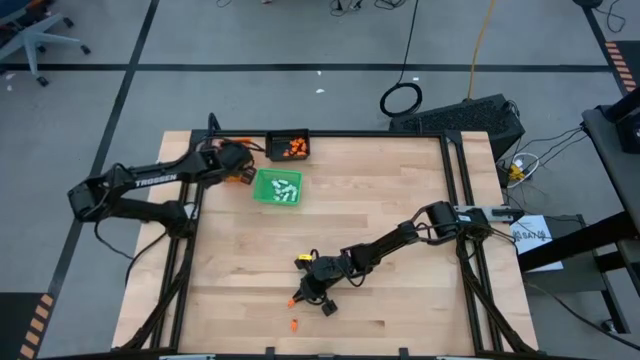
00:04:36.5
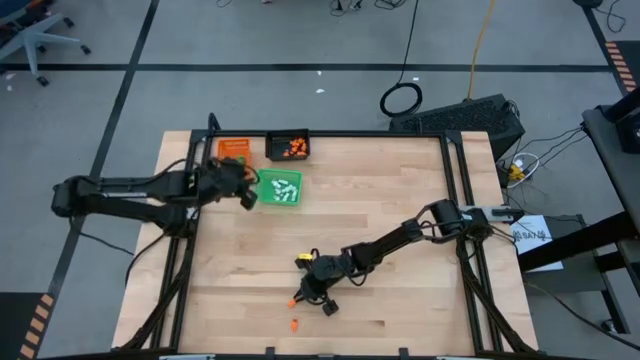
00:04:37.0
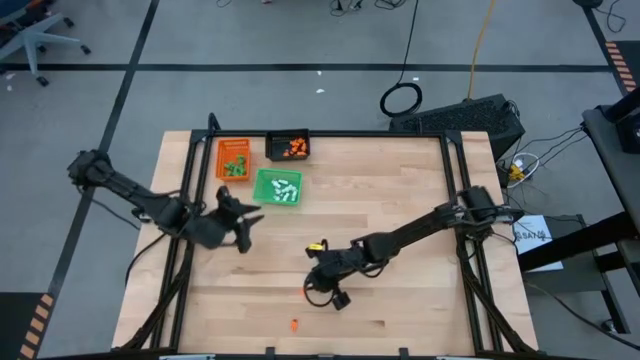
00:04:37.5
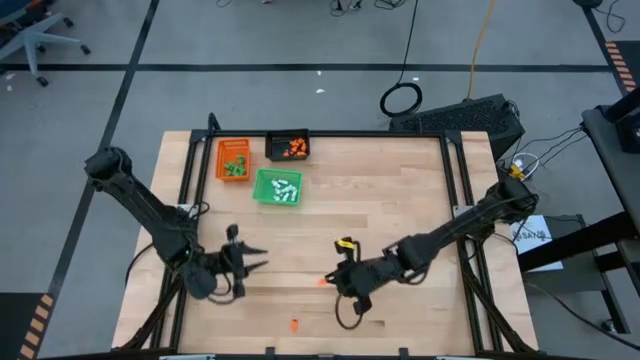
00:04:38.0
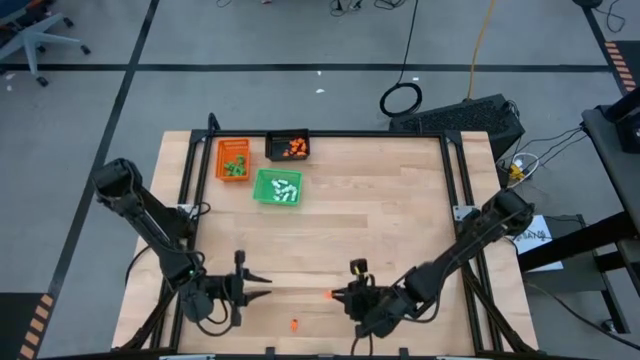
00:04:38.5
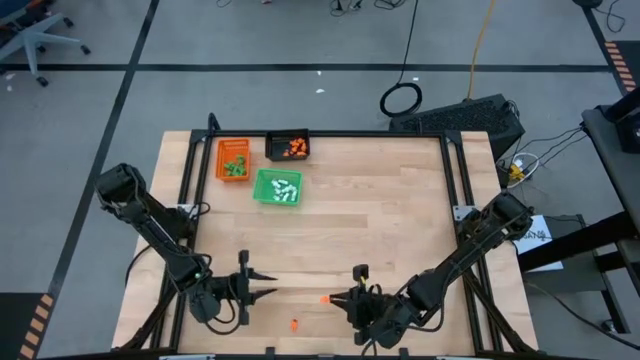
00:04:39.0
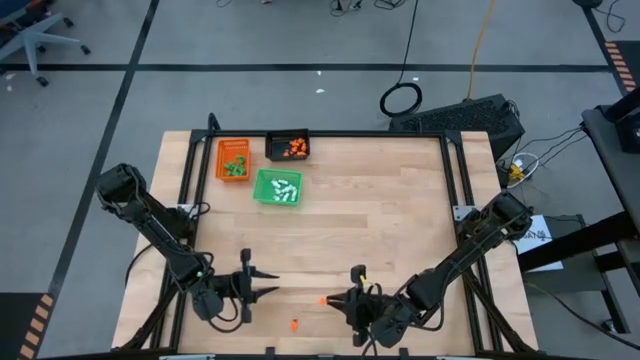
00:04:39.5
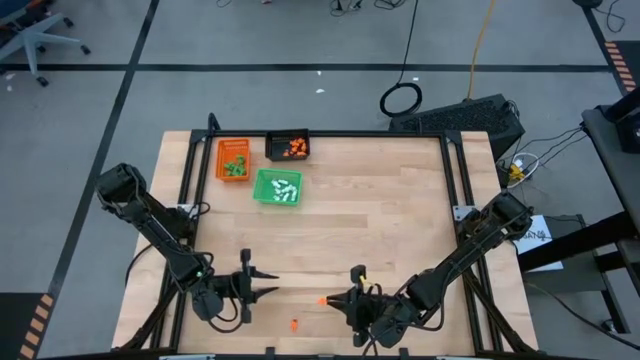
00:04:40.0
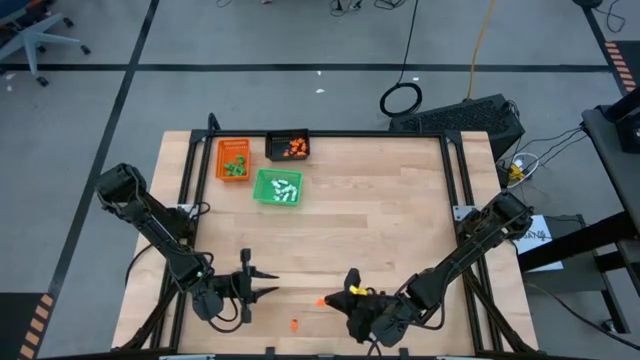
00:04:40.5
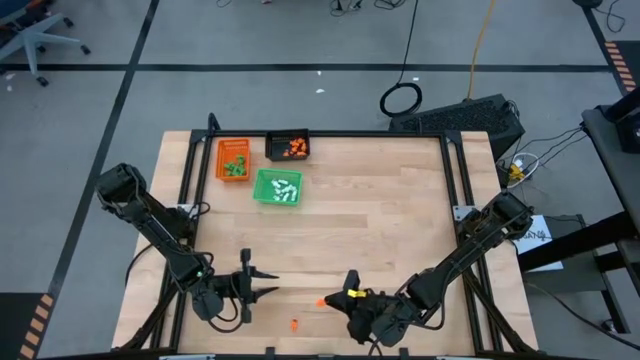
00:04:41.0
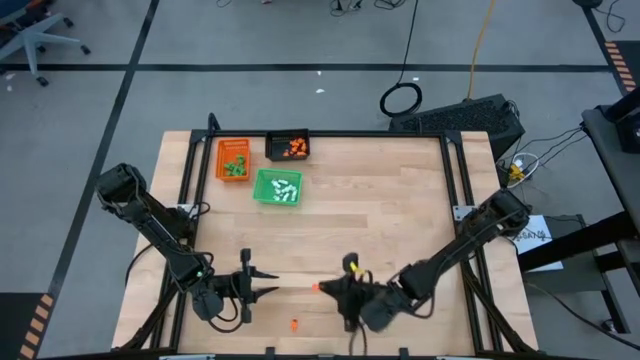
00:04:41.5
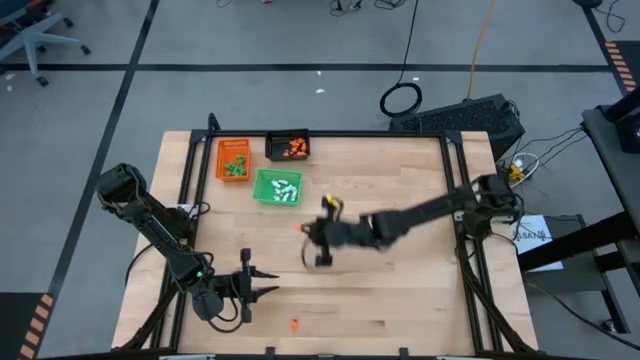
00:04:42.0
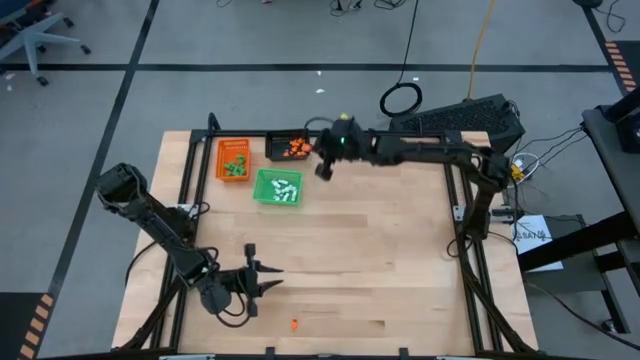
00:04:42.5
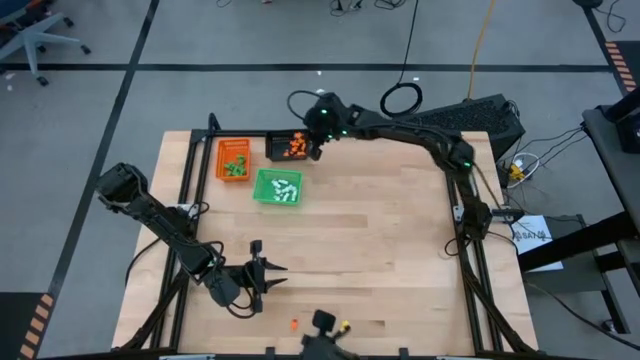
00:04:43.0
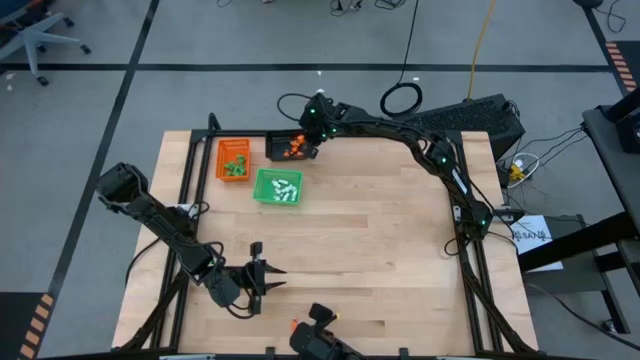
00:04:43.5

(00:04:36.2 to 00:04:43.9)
Task: Sort Halloween decoration
Put the orange skeleton toy into the black bin

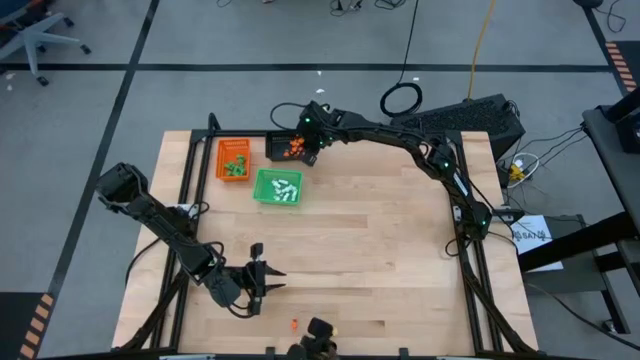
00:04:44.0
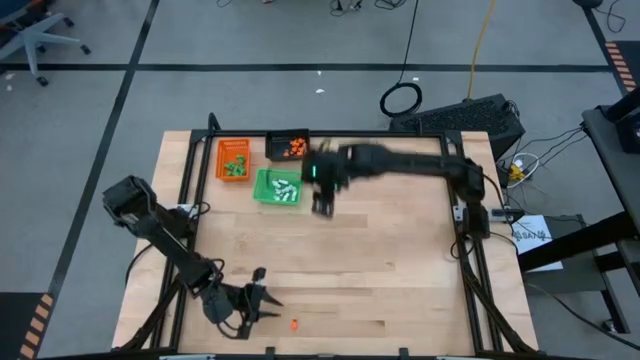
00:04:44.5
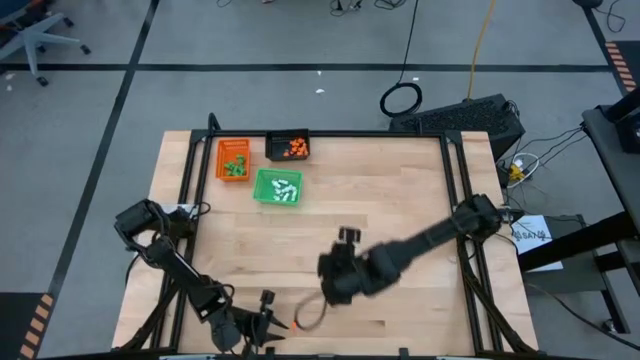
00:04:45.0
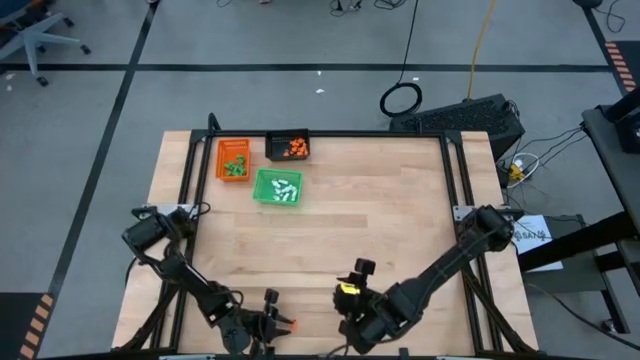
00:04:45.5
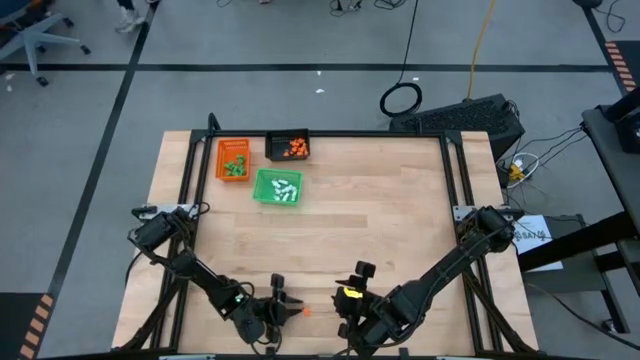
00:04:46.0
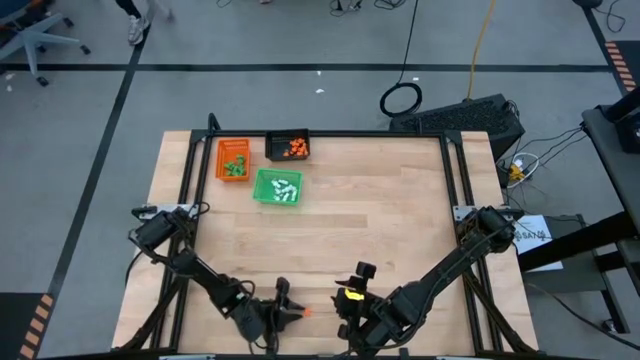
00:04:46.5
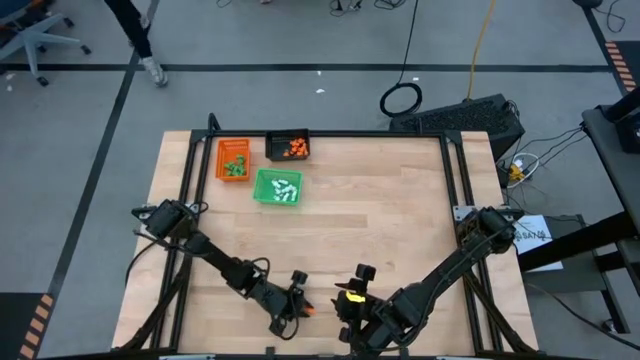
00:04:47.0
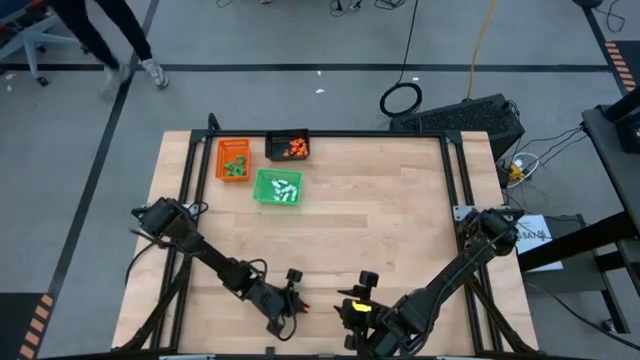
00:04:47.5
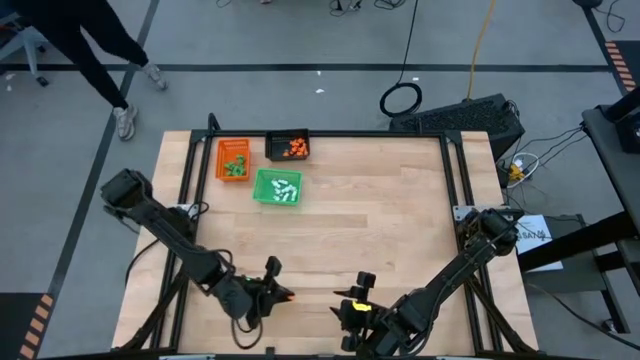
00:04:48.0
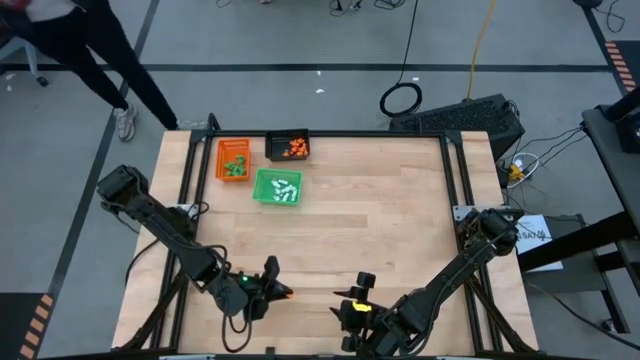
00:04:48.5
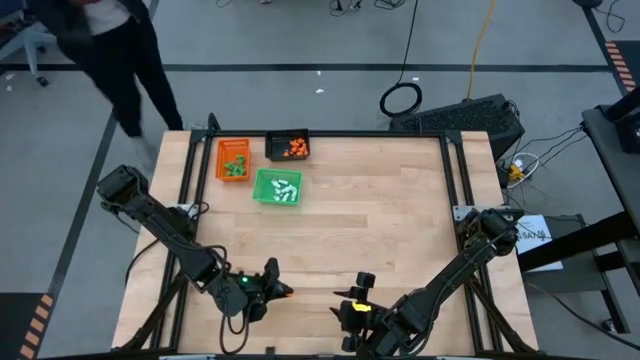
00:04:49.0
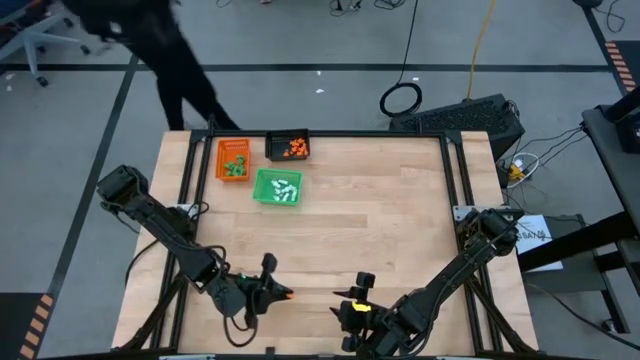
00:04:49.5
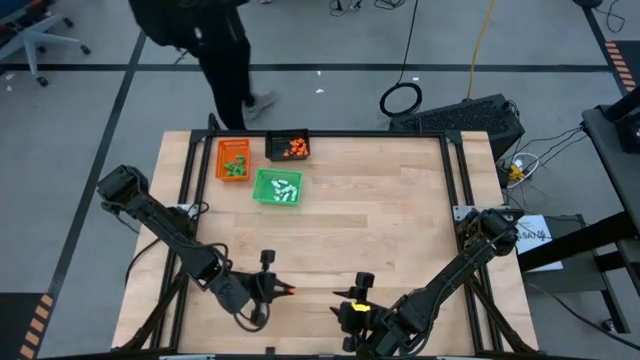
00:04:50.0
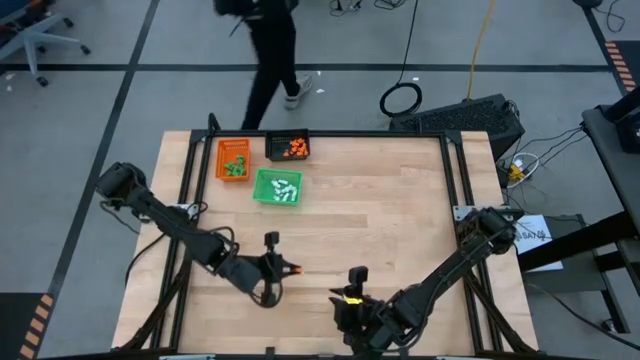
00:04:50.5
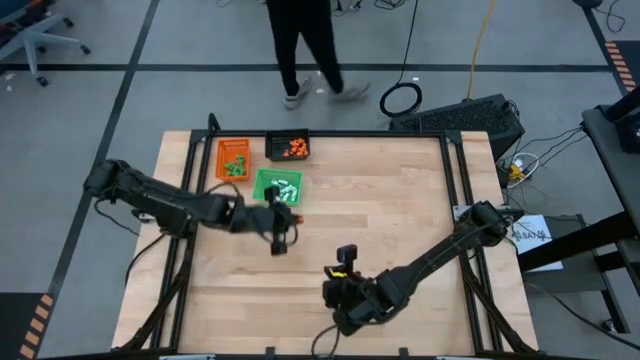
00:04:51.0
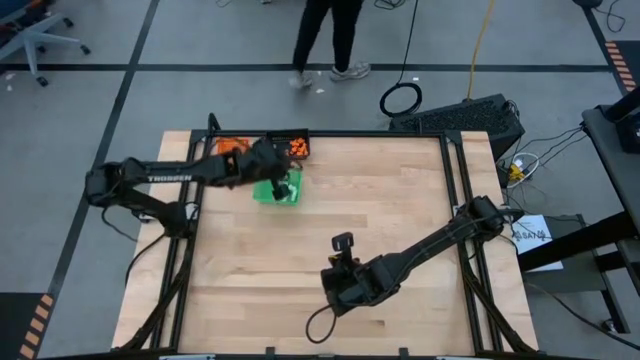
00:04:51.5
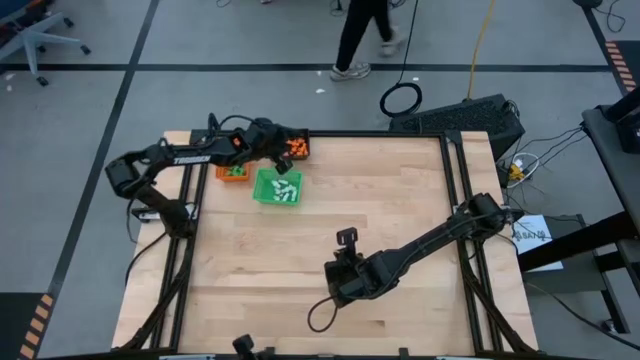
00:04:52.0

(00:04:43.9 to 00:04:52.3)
Put the orange skeleton toy into the black bin

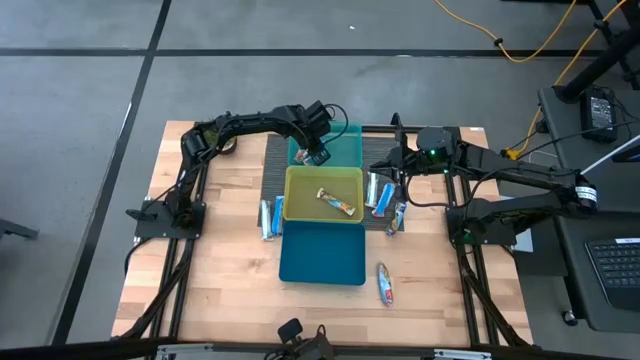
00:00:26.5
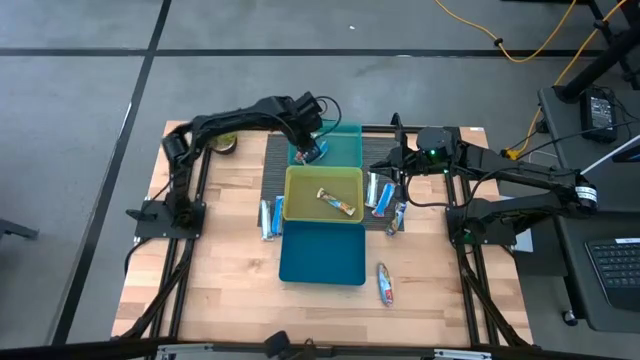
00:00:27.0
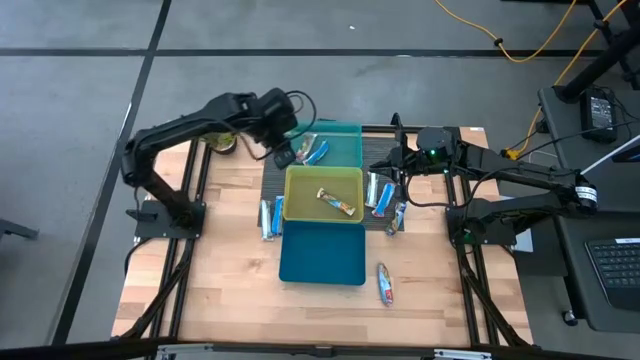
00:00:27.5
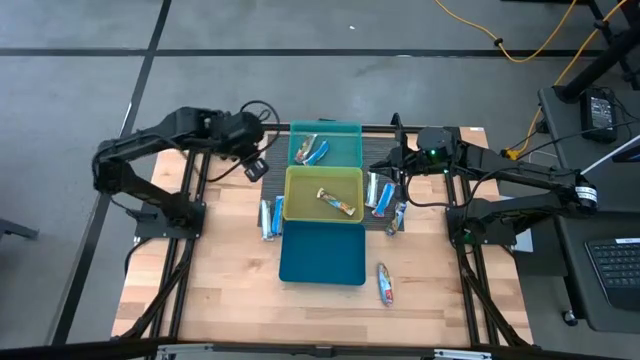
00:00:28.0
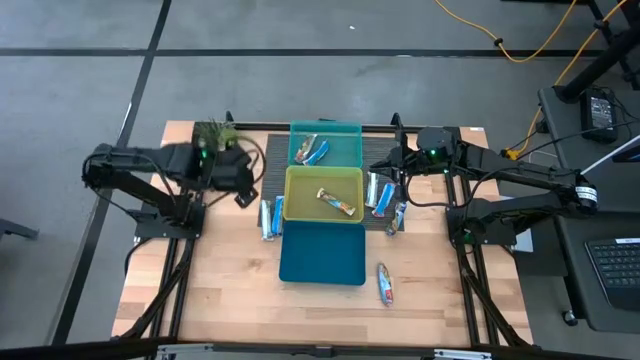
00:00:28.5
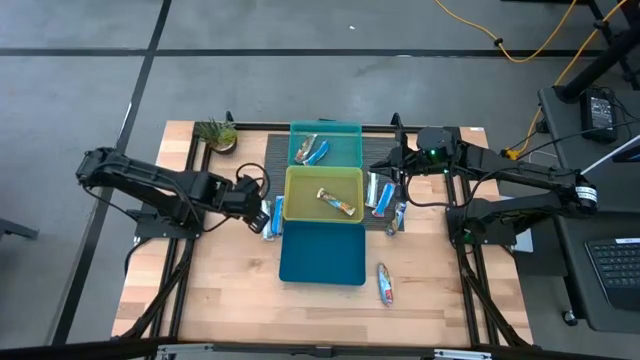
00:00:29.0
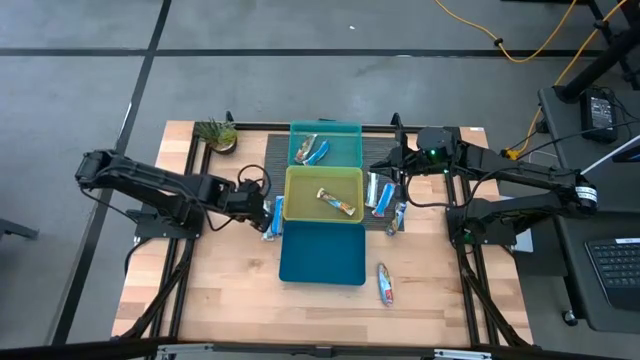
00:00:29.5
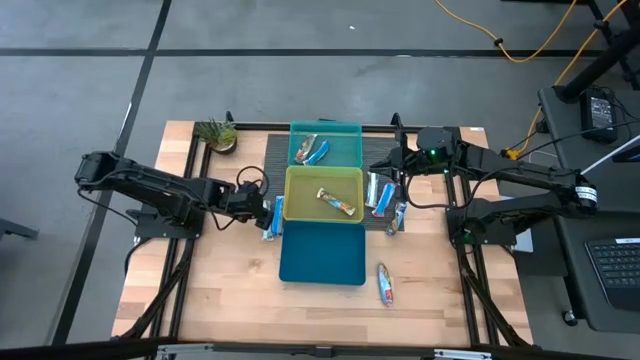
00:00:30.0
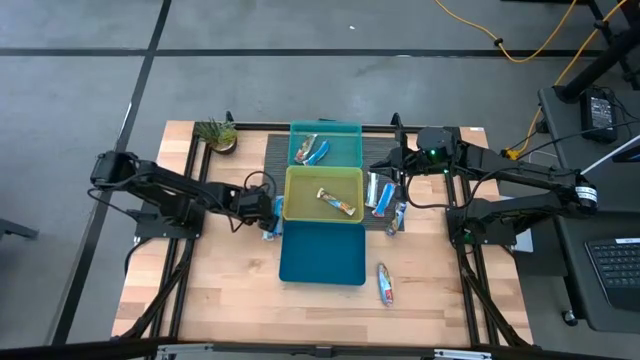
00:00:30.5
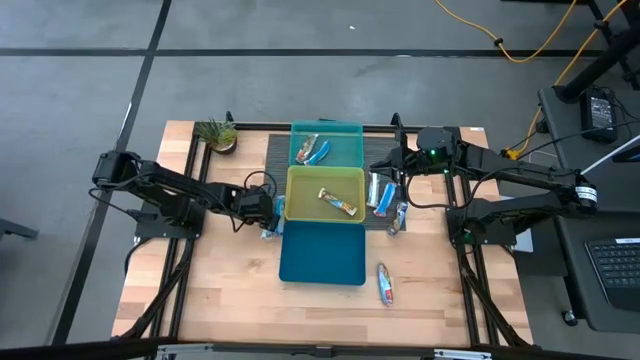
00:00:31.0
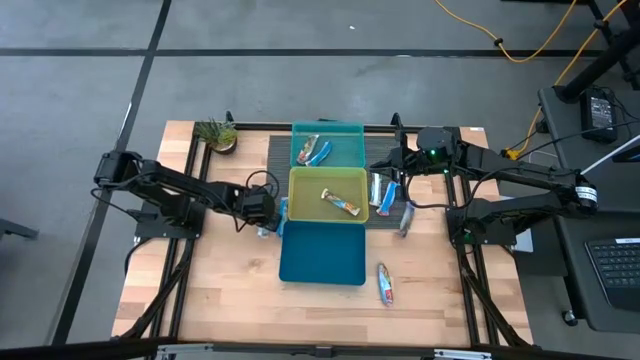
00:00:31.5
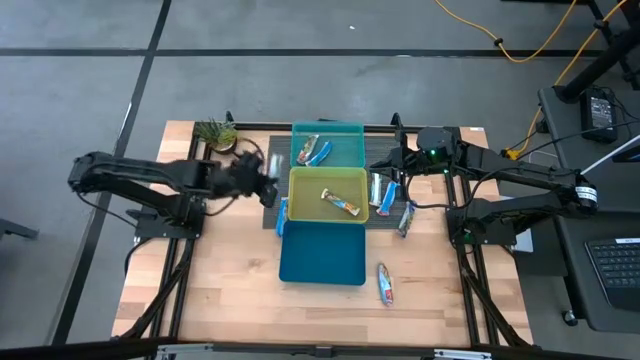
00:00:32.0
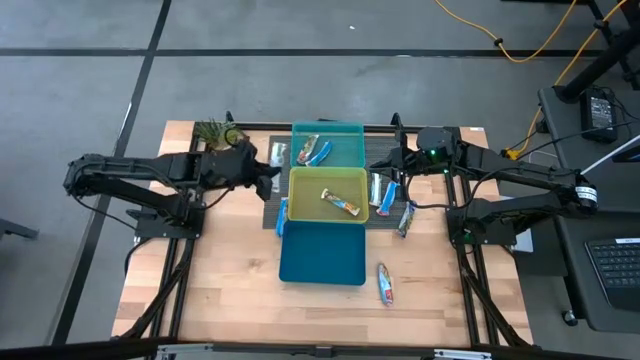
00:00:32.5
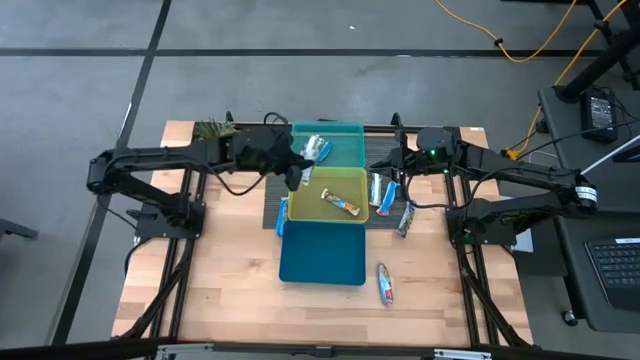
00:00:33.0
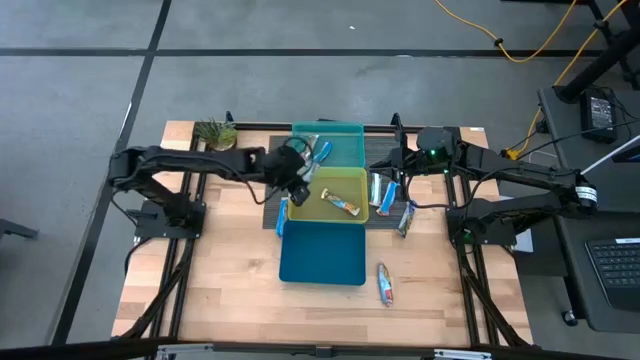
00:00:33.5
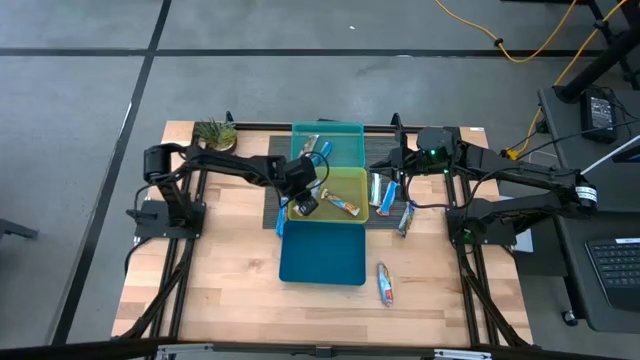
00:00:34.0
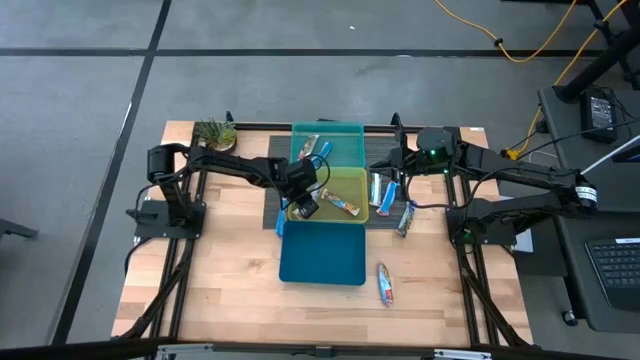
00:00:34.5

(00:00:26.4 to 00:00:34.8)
Task: Pick and place Granola Bars by type
Put the yellow granola bar into the yellow bin
